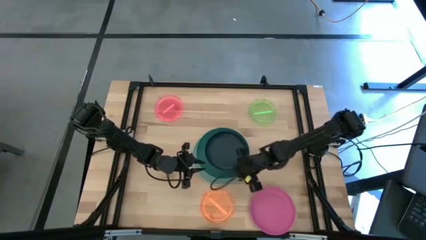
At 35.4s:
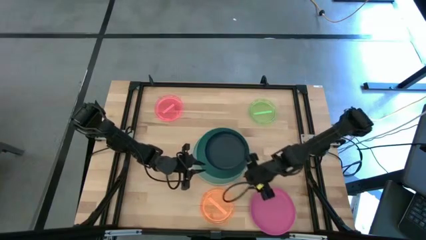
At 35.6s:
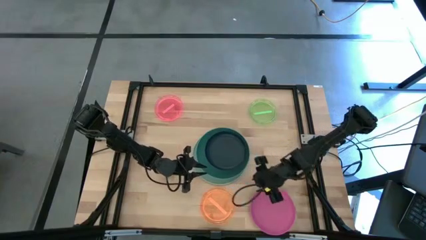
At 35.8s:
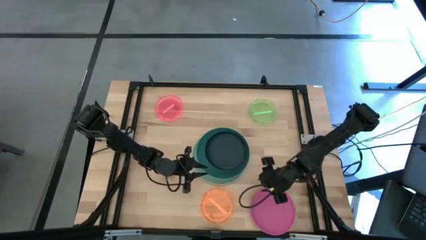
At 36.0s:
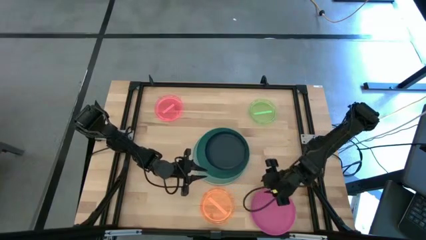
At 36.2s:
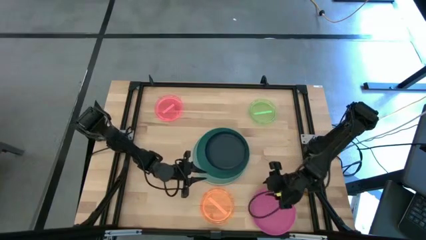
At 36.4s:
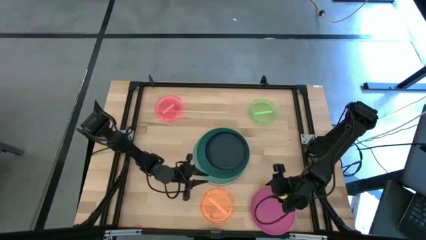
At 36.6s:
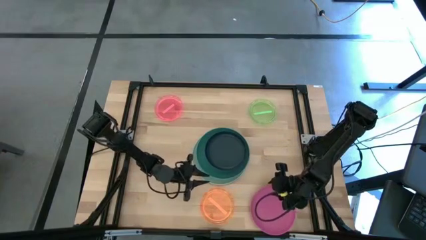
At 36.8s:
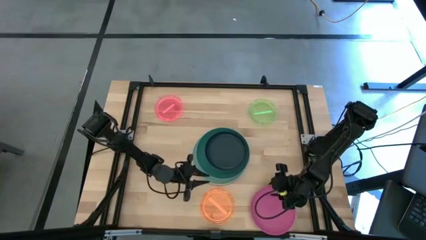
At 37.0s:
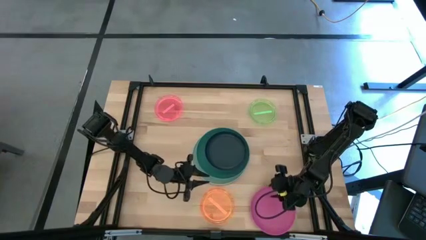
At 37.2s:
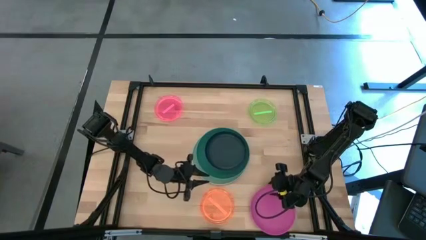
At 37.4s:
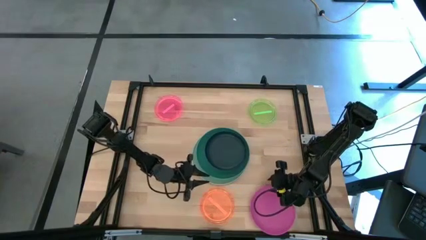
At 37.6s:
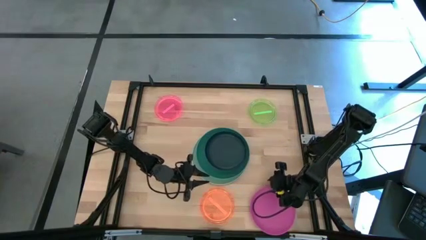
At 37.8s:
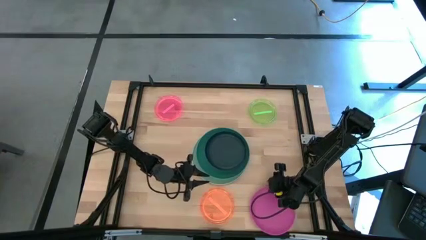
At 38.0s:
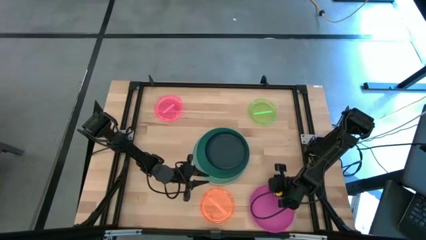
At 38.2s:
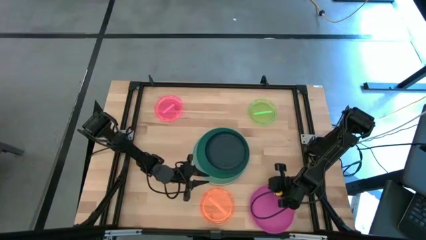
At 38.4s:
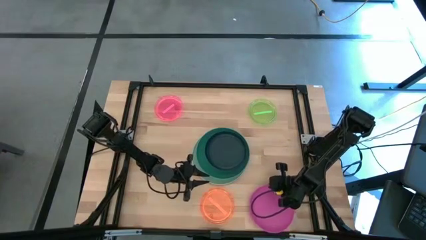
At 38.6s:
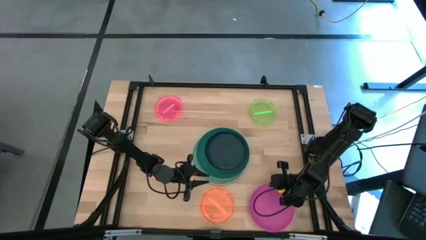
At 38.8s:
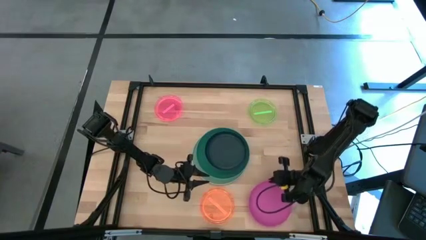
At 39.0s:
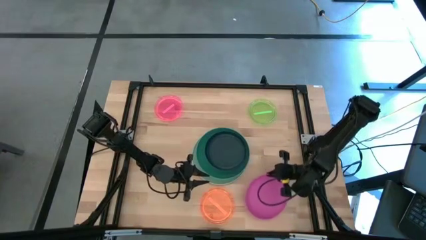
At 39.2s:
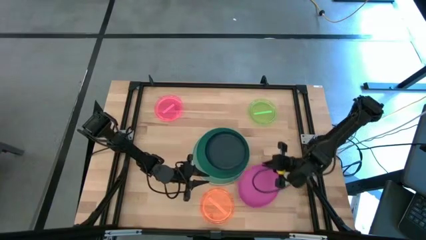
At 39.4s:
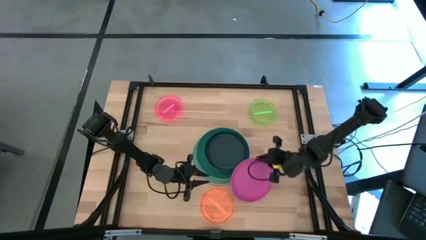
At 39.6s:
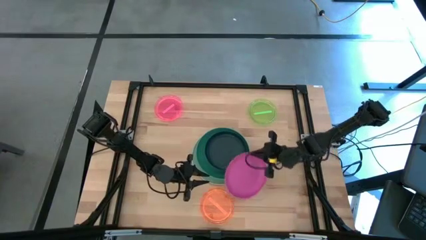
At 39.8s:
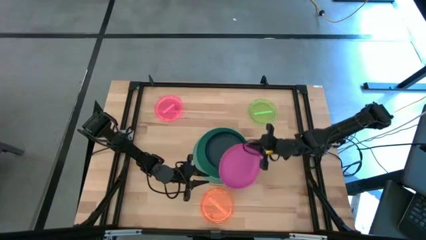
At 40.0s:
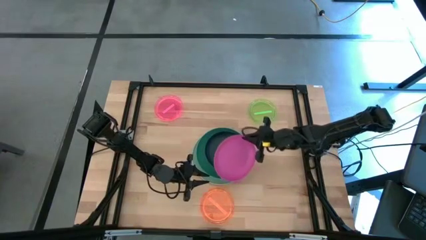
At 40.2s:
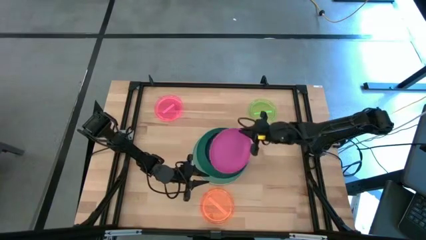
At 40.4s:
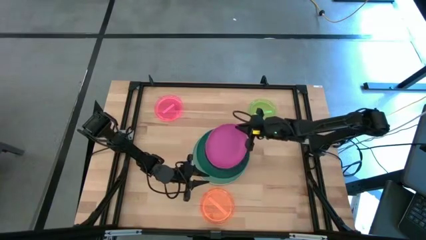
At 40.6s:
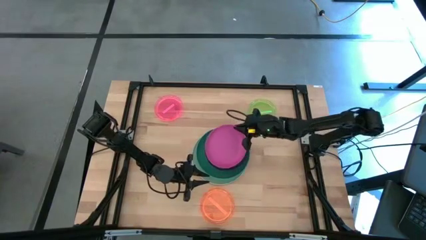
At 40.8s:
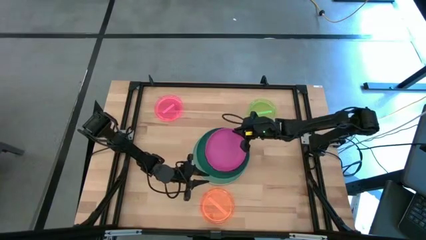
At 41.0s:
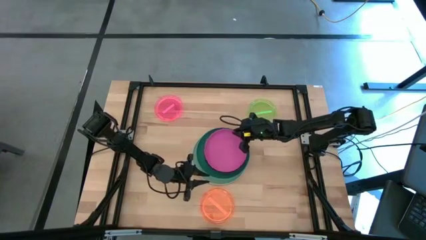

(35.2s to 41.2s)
Task: Stack plastic plates
Stack the pink plate on top of the black plate

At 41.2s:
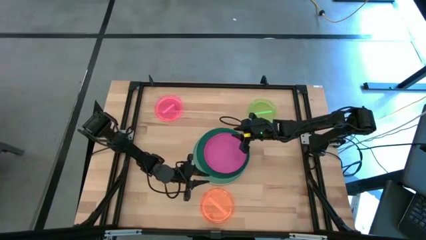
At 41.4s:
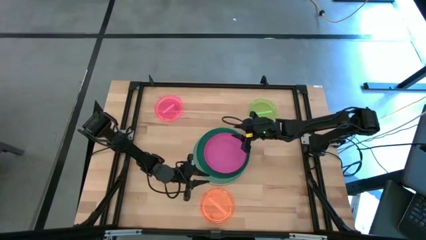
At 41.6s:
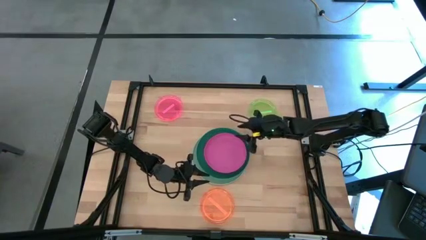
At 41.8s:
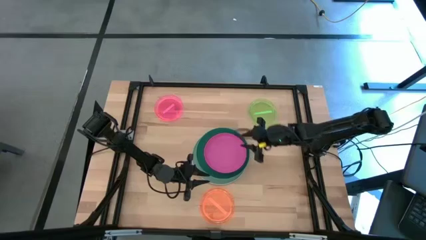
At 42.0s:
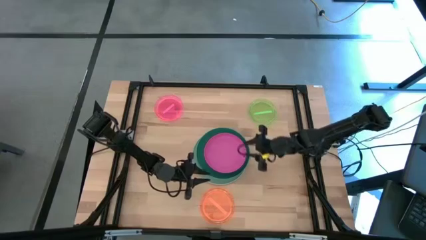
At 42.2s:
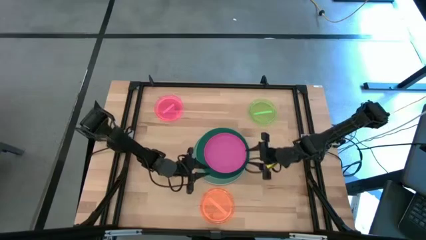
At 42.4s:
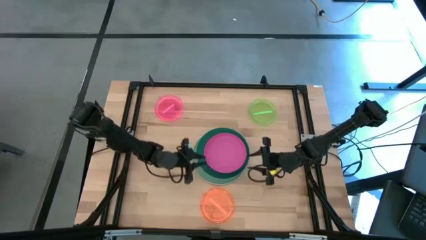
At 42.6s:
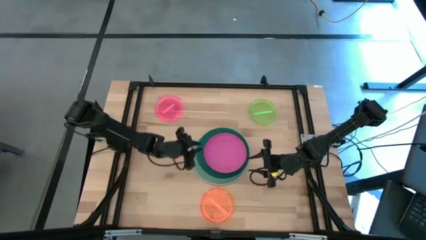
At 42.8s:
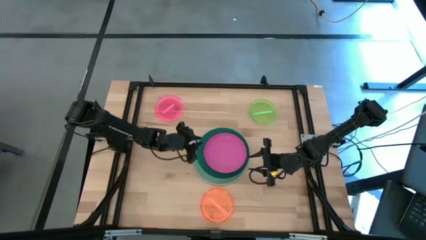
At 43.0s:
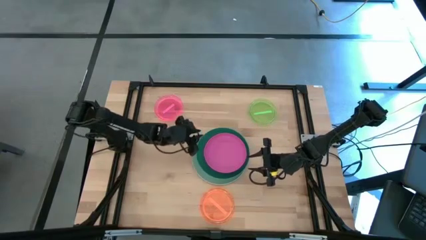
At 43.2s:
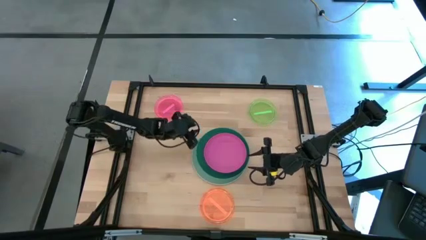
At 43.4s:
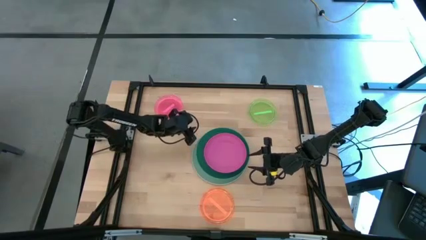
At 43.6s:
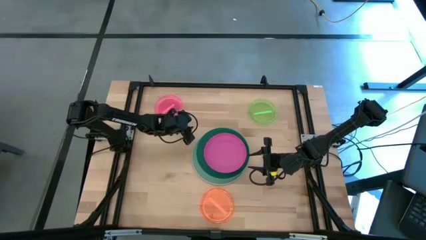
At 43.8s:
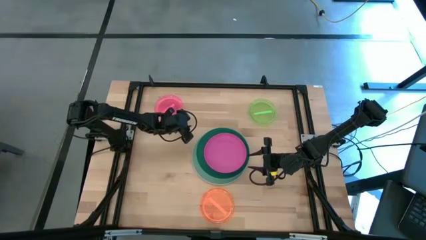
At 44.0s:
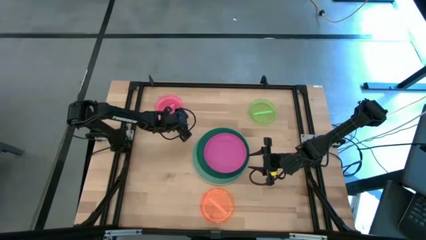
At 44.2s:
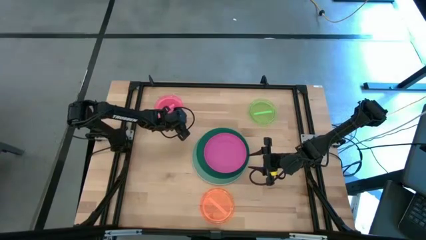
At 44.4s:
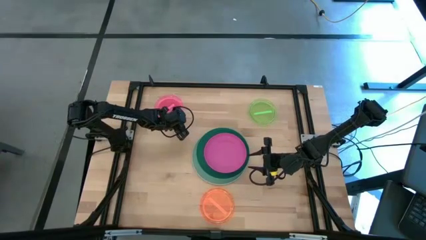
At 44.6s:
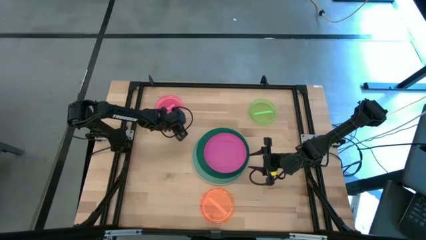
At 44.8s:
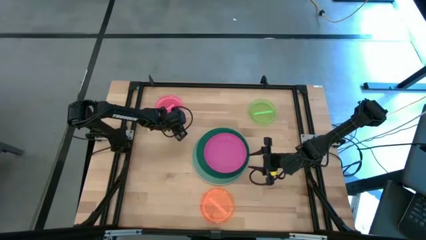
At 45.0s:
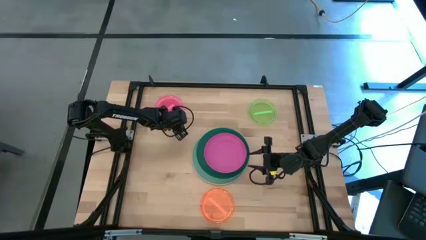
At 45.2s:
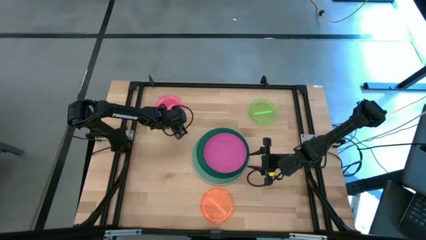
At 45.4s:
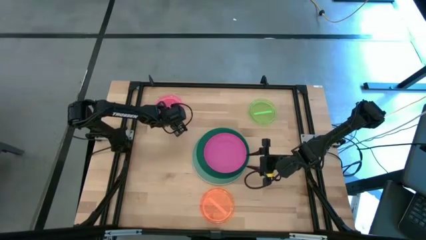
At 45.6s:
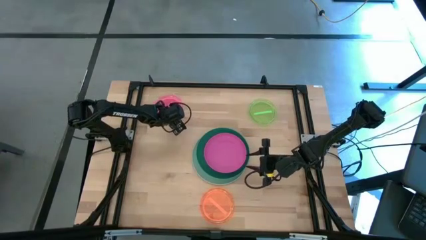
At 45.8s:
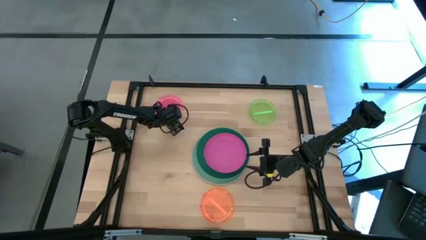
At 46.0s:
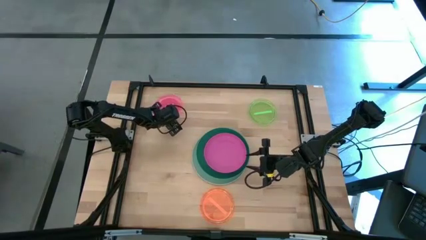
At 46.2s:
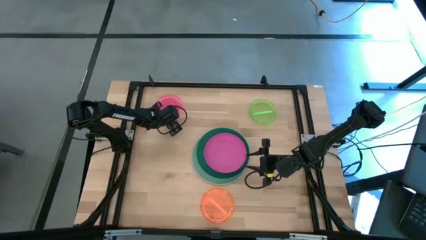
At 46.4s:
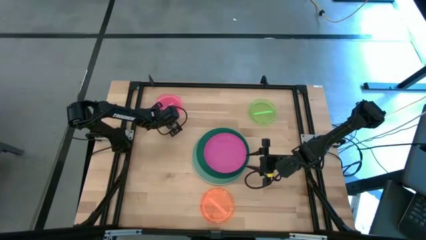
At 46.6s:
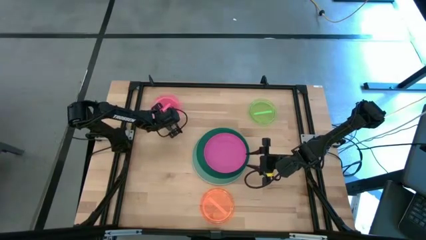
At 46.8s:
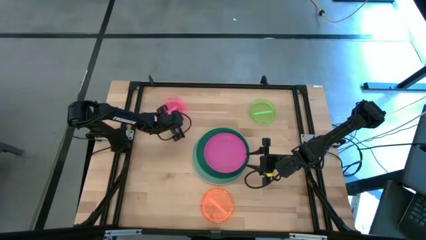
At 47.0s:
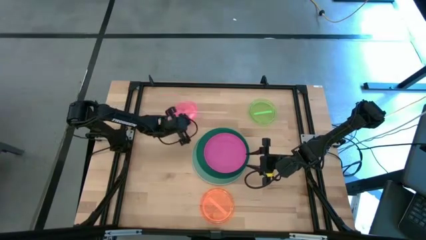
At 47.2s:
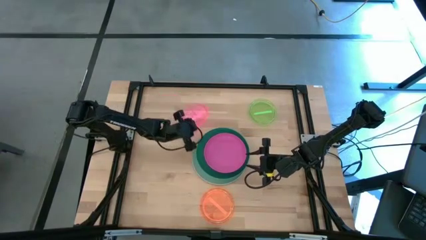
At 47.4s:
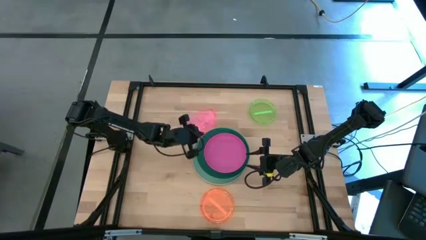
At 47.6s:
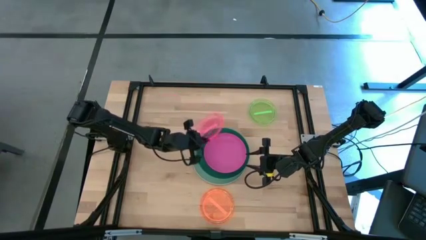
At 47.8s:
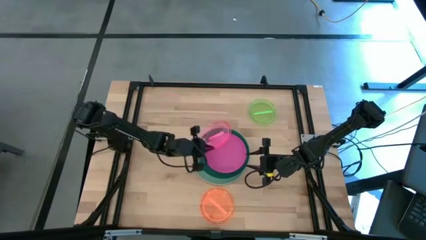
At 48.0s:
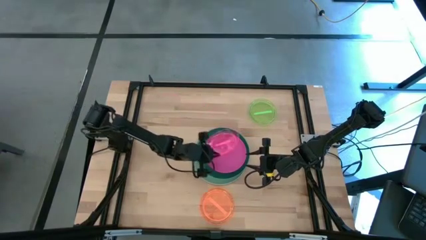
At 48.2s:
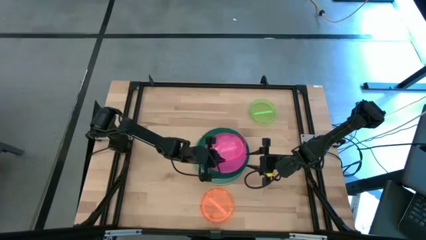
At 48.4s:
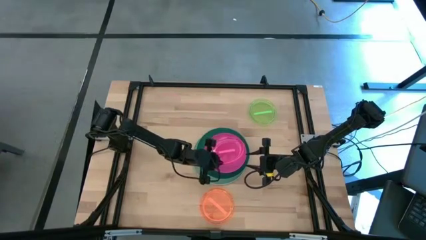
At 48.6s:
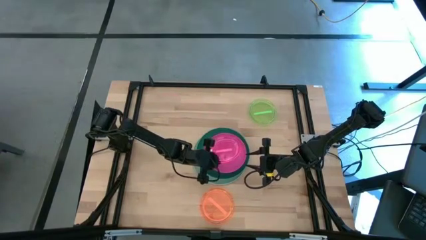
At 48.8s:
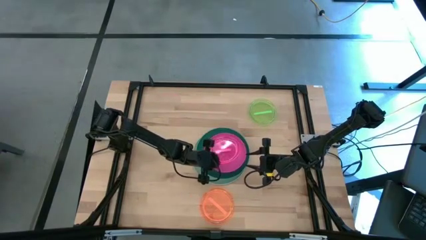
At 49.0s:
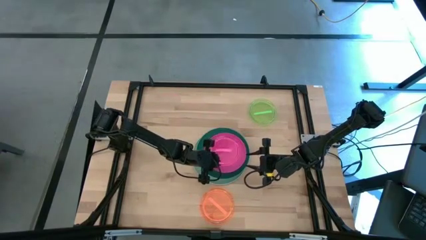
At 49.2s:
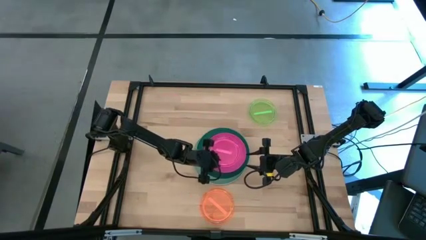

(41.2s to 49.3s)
Stack the light pink plate on top of the pink plate
